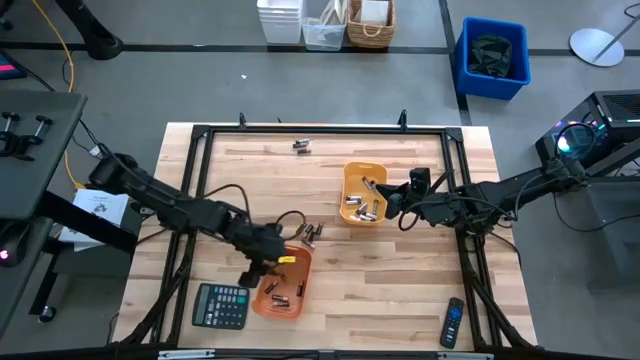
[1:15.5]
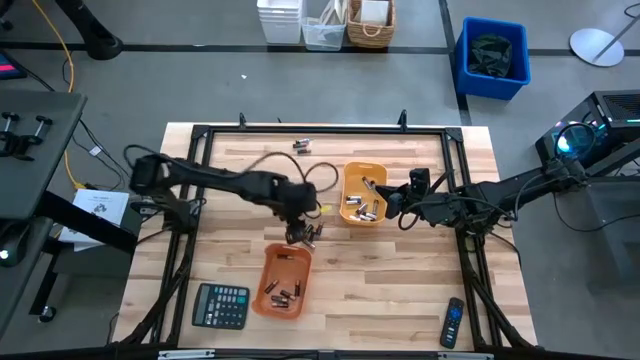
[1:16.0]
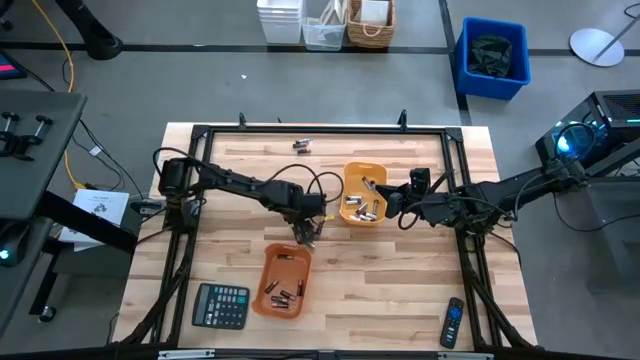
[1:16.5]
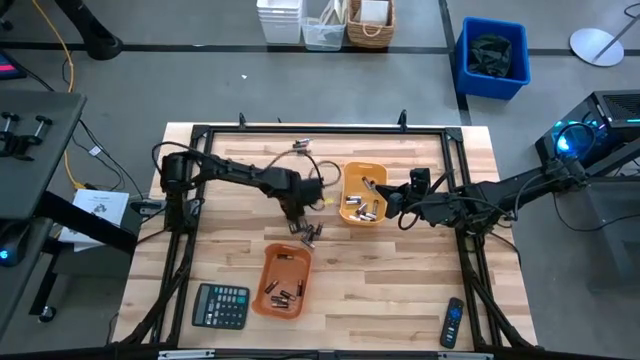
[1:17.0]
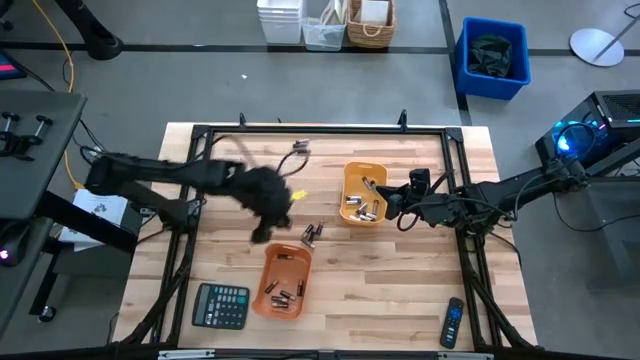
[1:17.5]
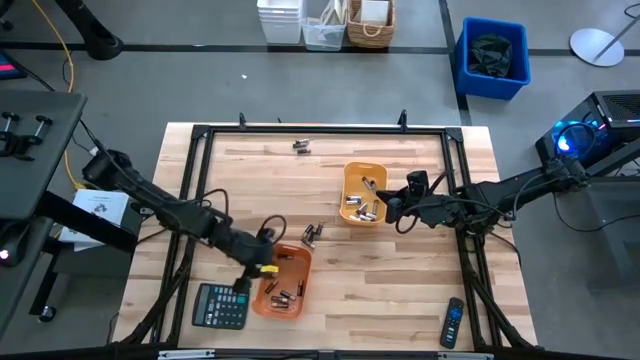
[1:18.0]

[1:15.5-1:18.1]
Task: Sort batteries
Put the black battery into the orange bin

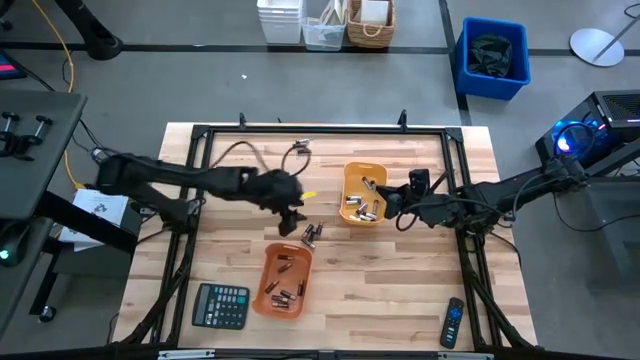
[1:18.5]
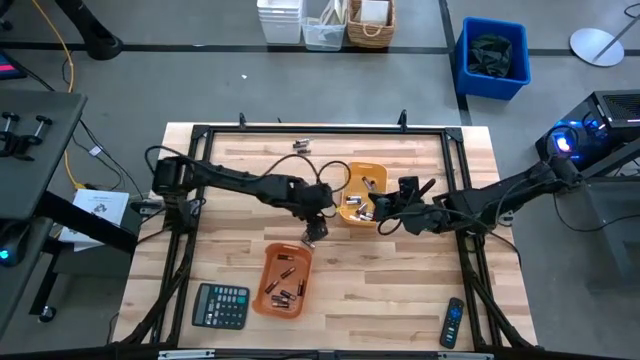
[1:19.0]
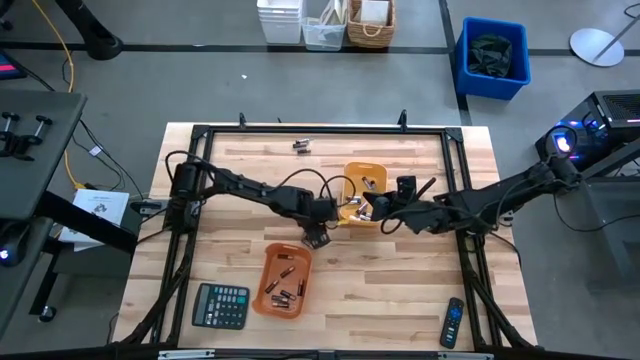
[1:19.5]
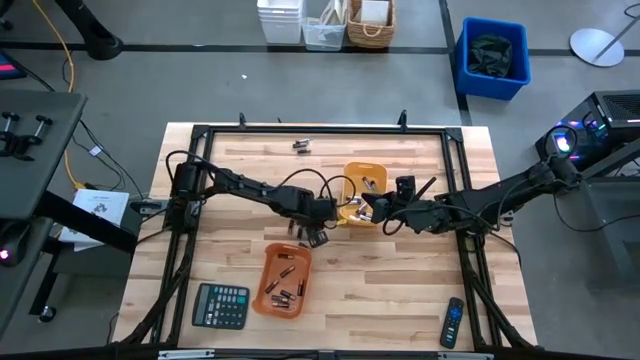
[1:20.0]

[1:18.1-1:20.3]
Put the black battery into the orange bin

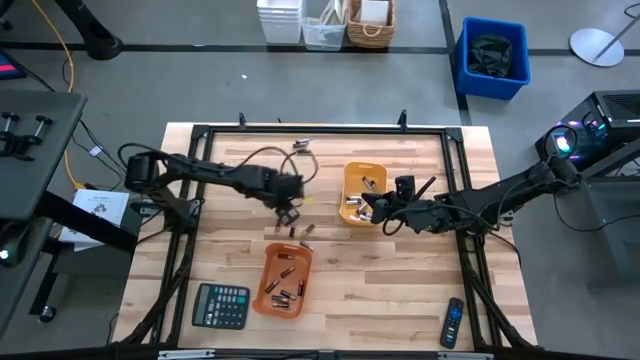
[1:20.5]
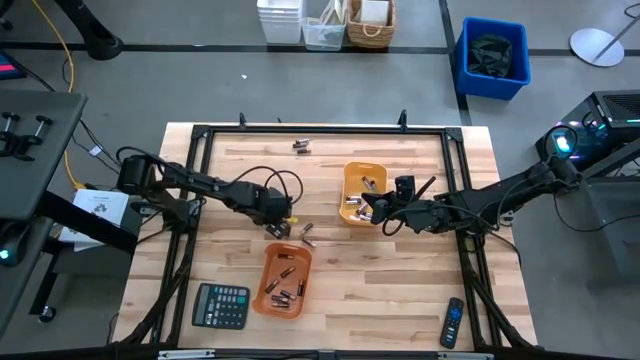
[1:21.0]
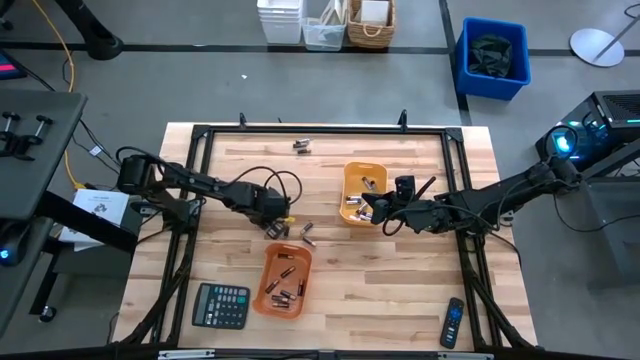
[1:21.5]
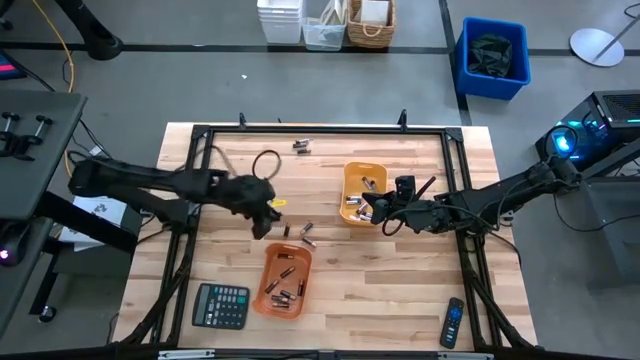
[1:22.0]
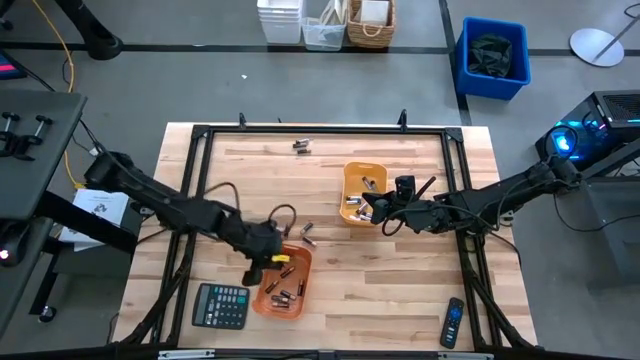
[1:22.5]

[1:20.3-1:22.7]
Put the black battery into the orange bin

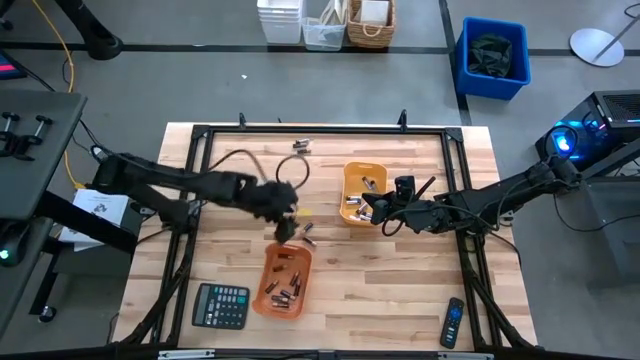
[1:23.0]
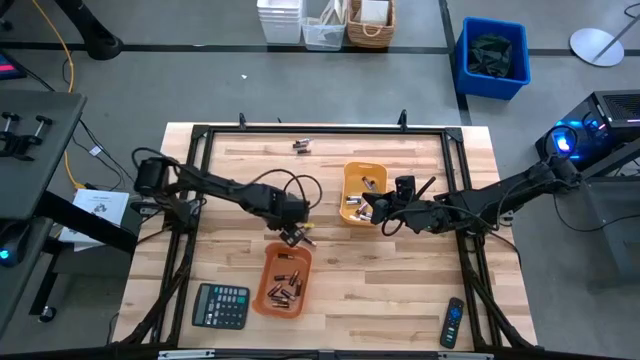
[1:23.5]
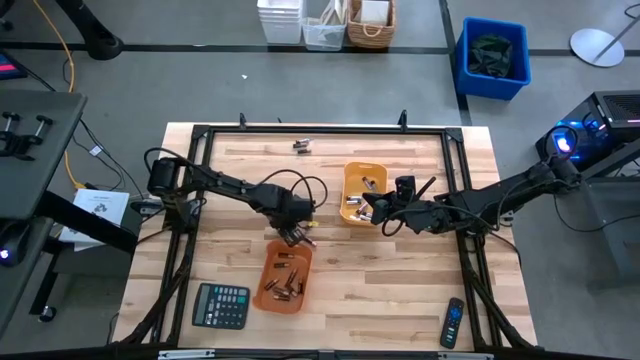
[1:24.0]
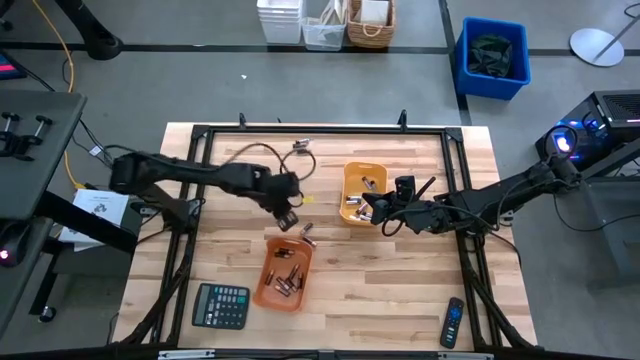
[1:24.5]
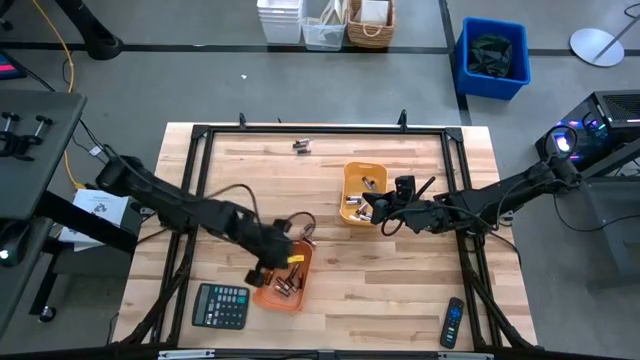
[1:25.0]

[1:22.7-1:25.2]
Put the black battery into the orange bin

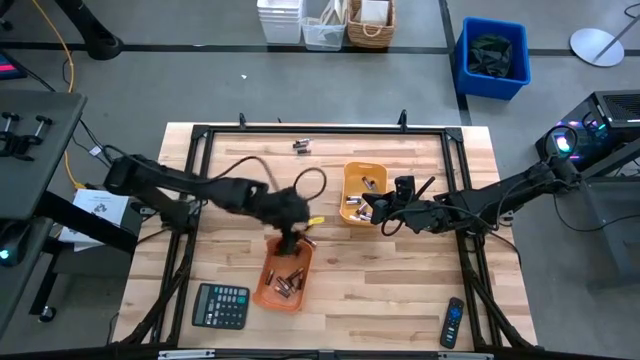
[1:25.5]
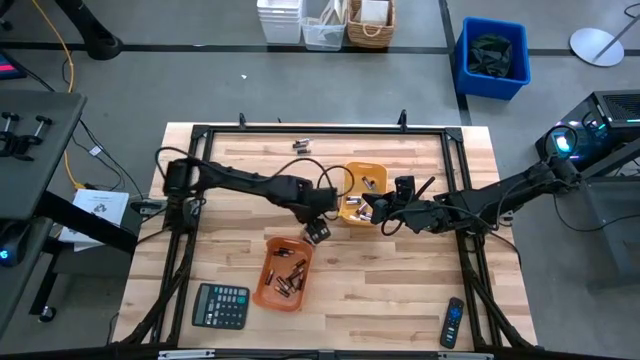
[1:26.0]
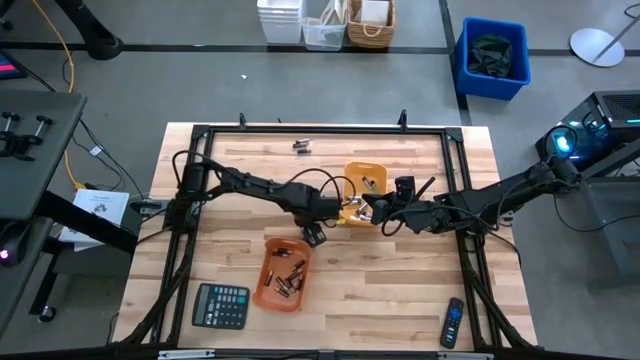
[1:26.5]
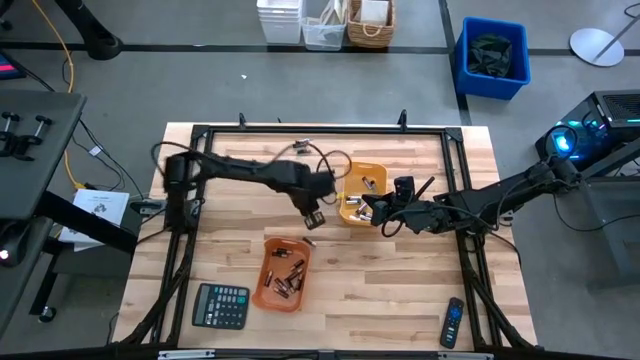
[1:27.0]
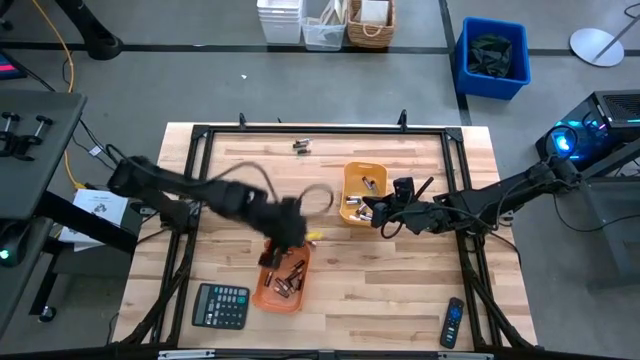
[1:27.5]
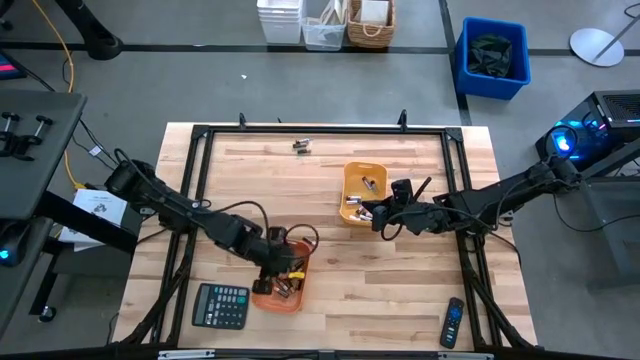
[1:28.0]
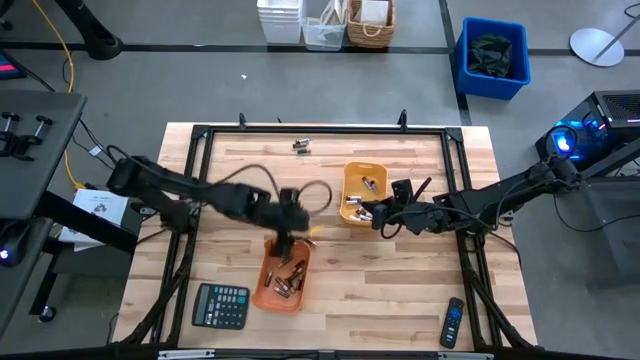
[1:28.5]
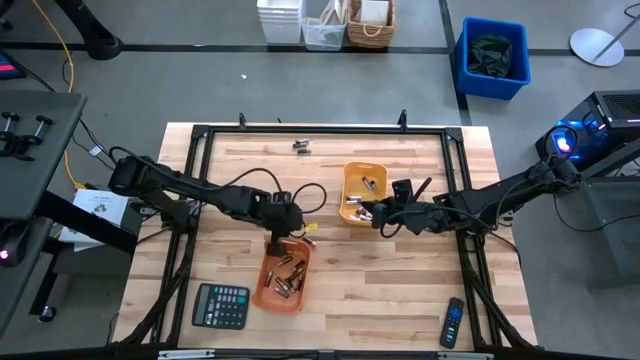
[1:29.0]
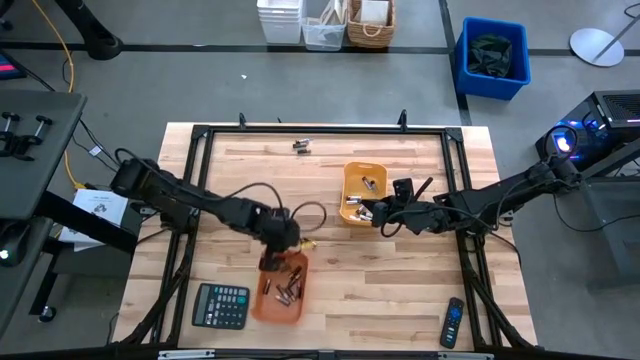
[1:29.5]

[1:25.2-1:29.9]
Put the black battery into the orange bin

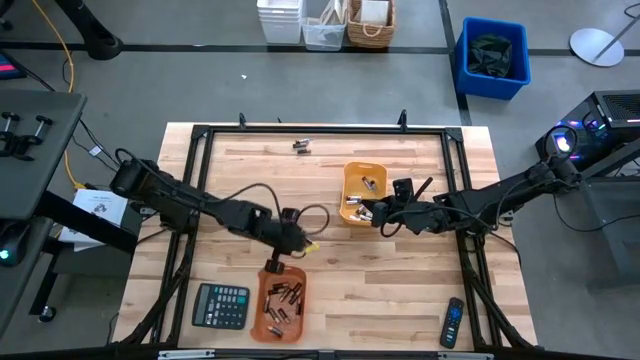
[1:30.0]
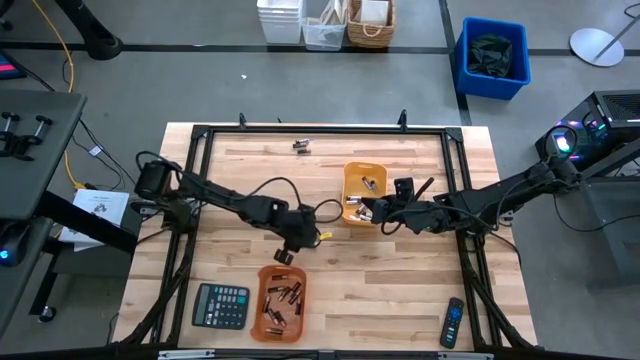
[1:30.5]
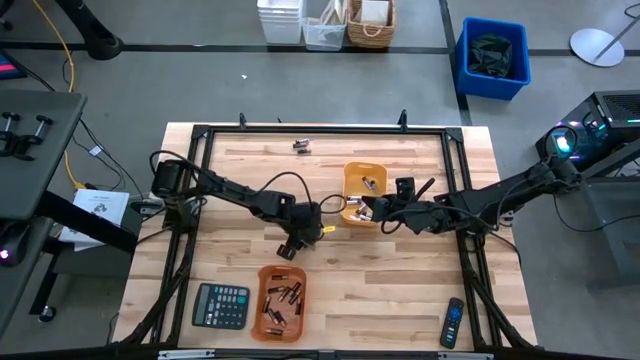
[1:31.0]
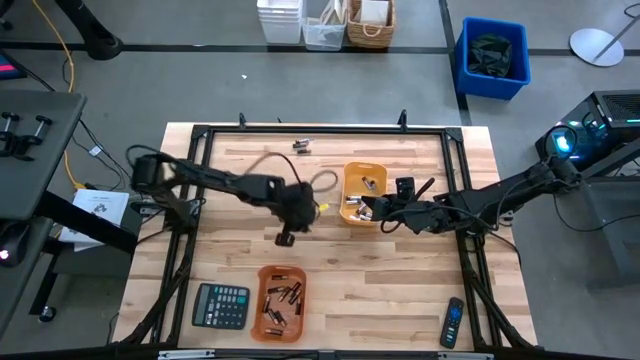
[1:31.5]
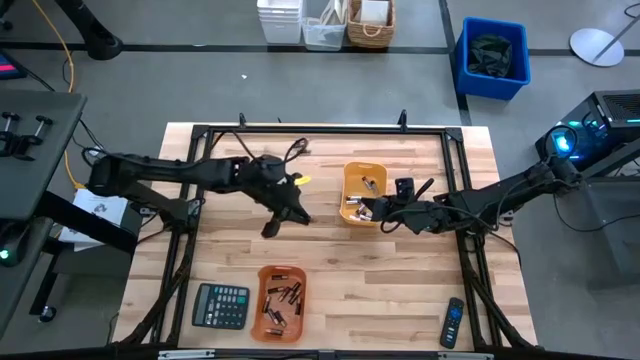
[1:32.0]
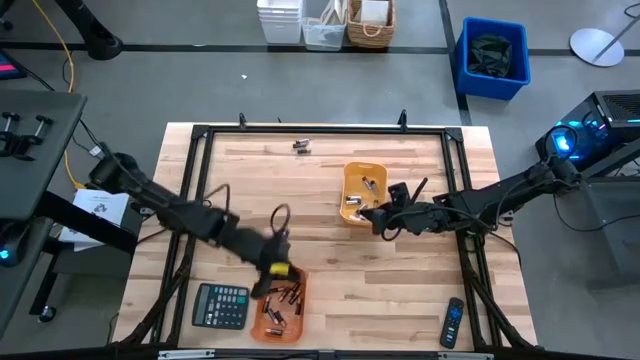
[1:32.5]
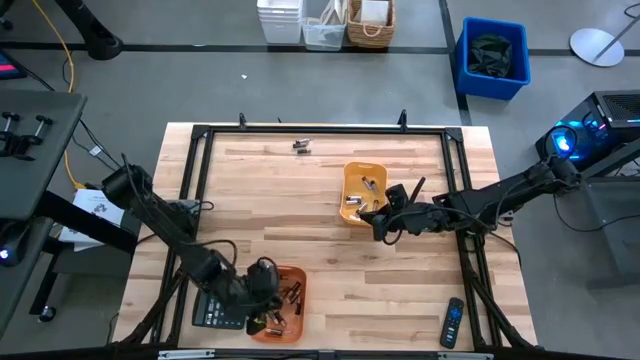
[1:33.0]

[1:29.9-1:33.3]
Put the black battery into the orange bin

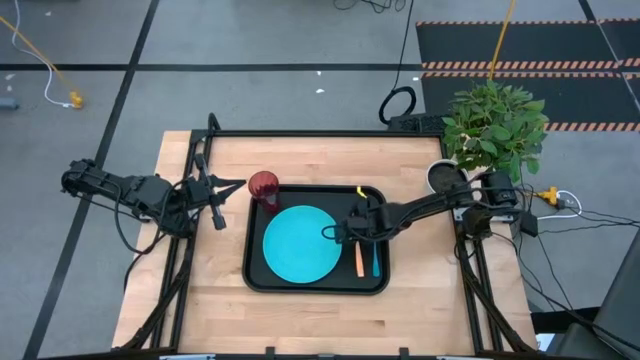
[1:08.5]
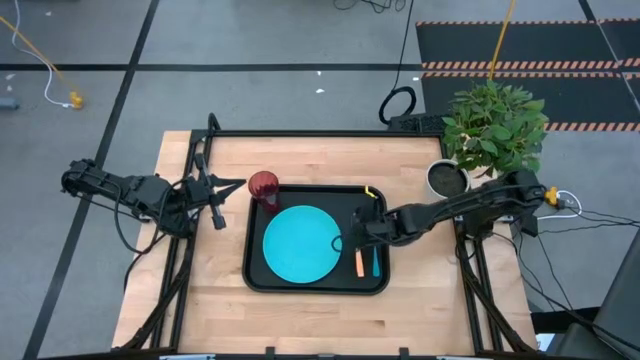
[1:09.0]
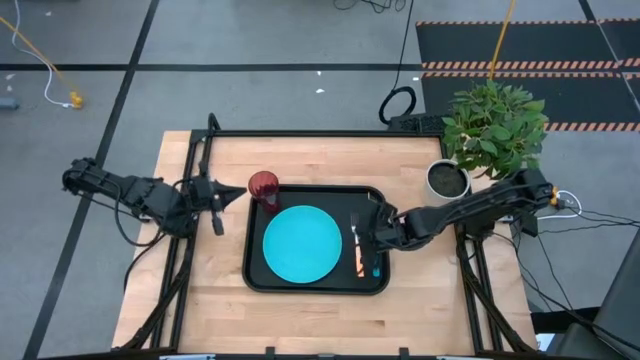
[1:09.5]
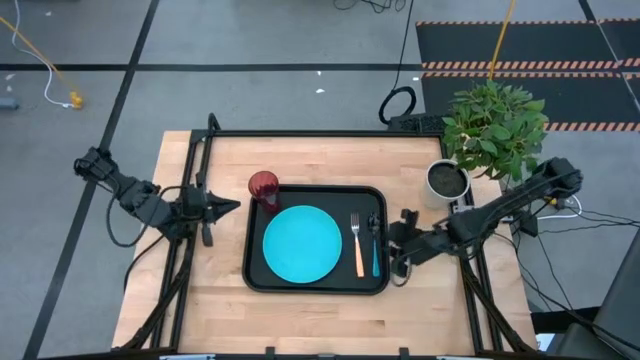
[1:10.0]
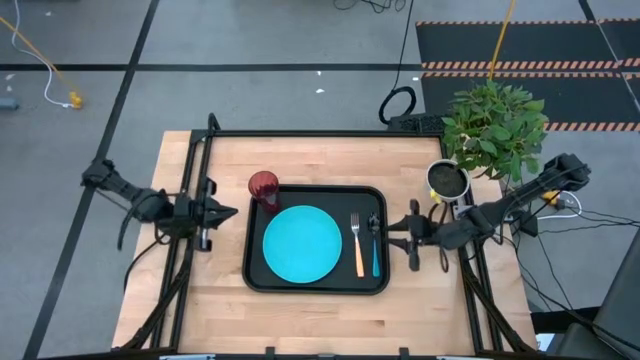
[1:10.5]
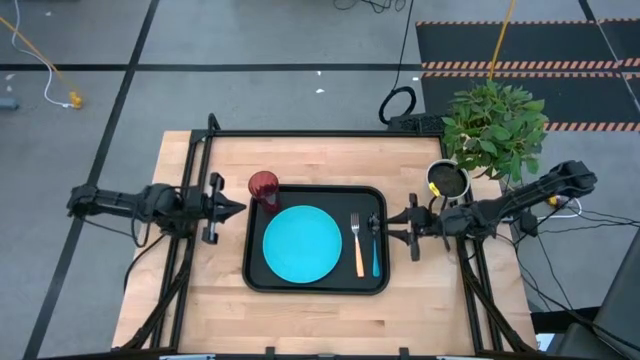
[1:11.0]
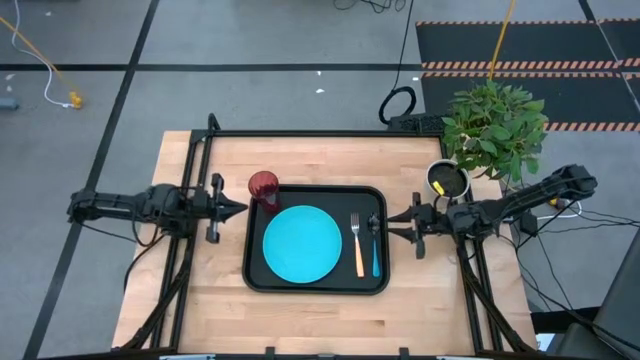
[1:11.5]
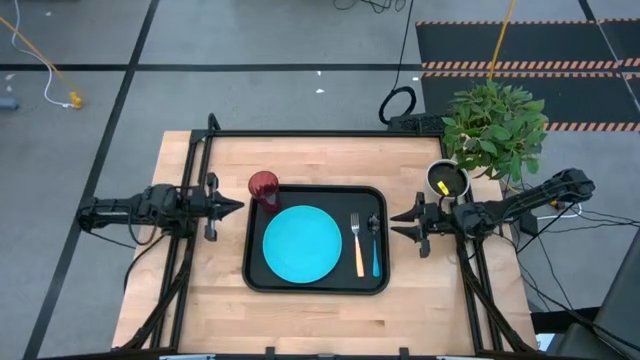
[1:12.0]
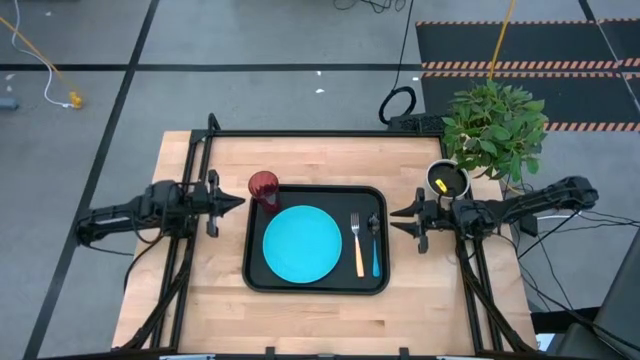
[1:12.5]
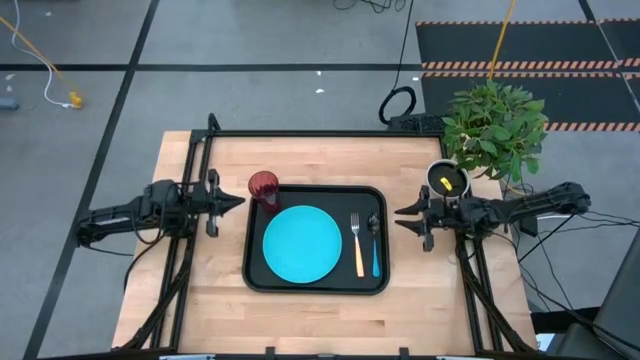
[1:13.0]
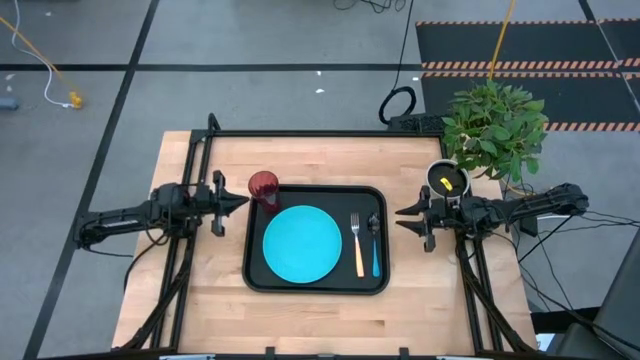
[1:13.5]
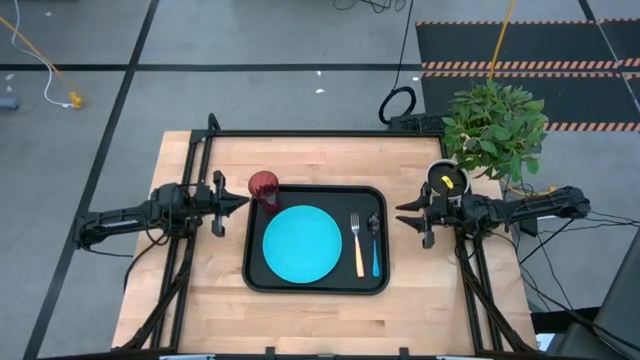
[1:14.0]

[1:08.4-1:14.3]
Task: Pick and place plate/cup/fork/spoon on tray
Return to Home Position
